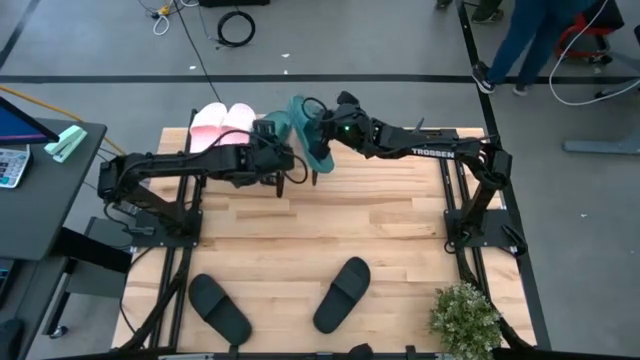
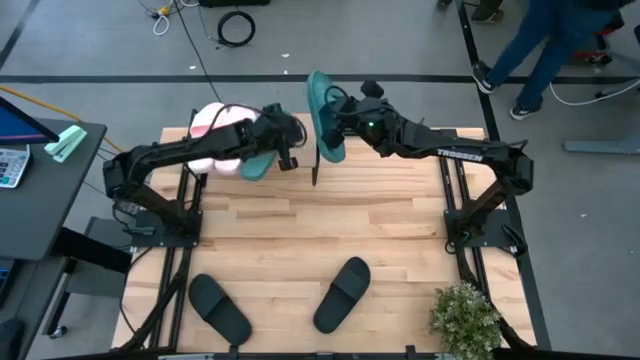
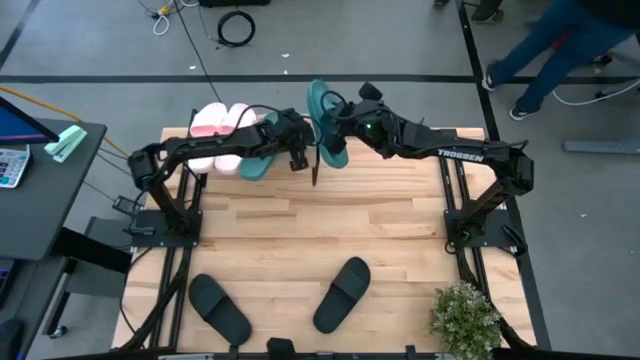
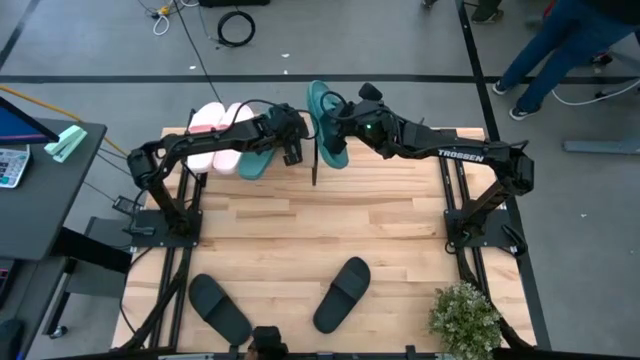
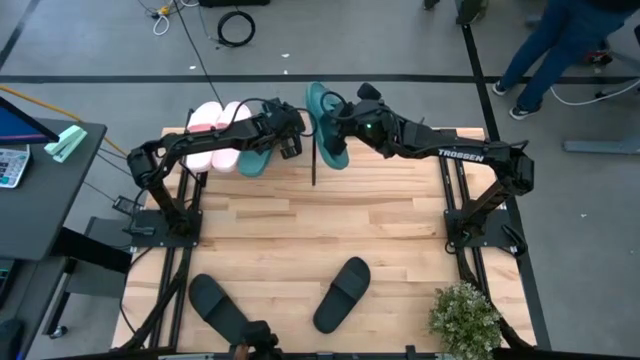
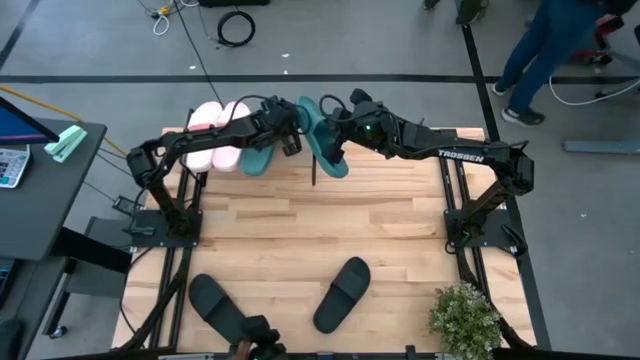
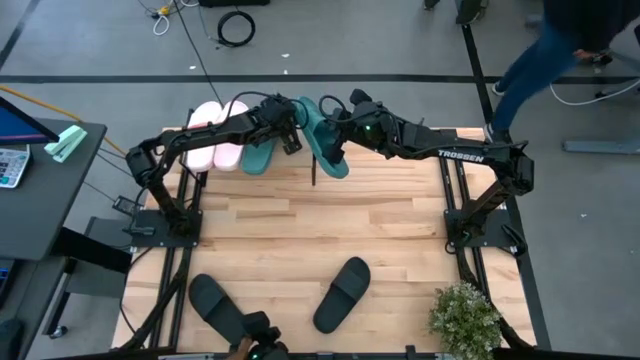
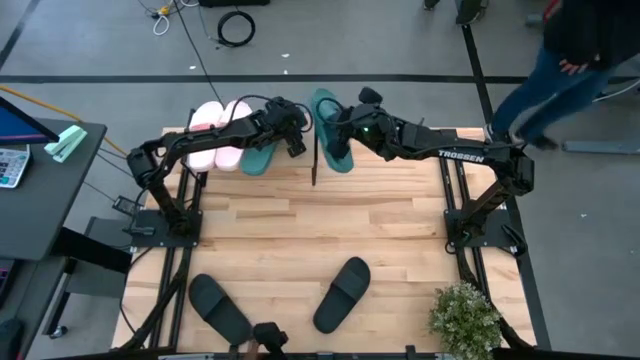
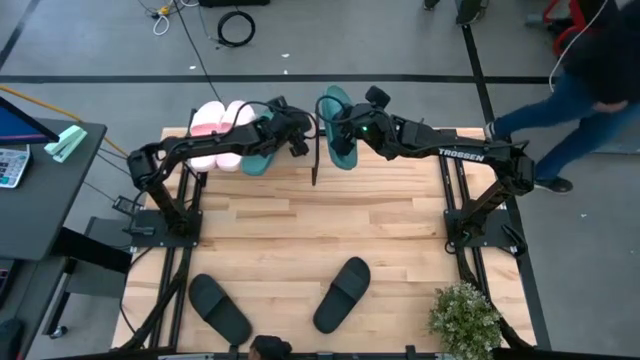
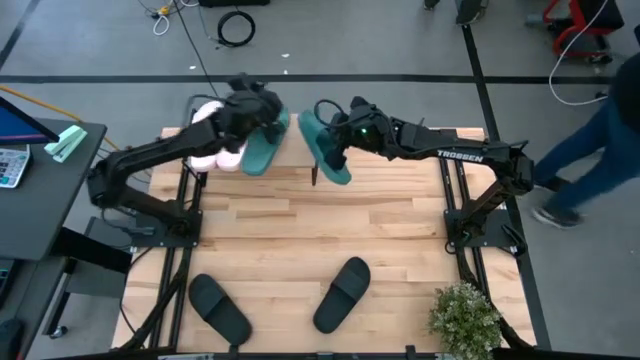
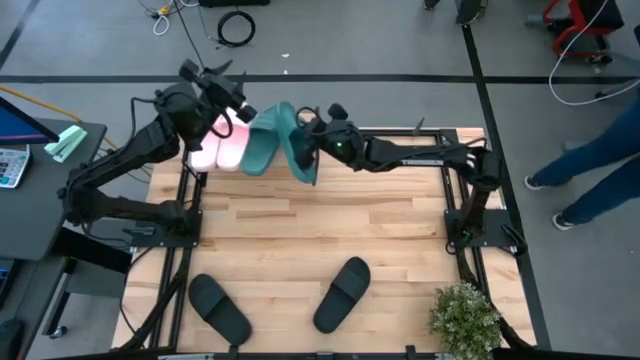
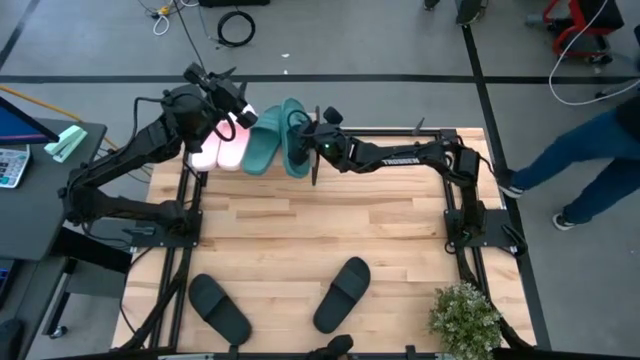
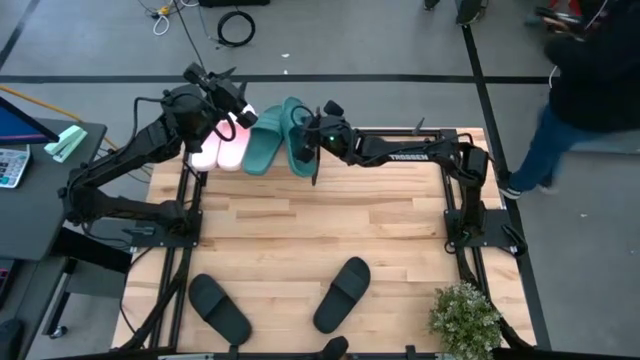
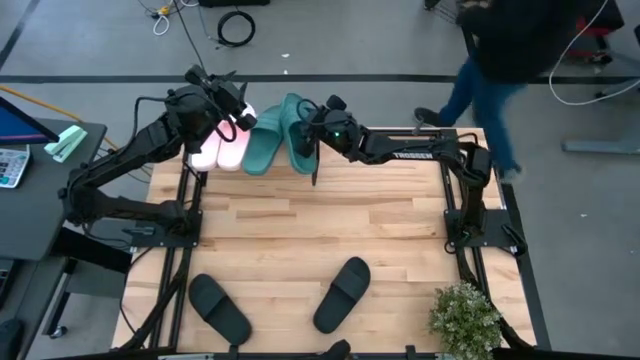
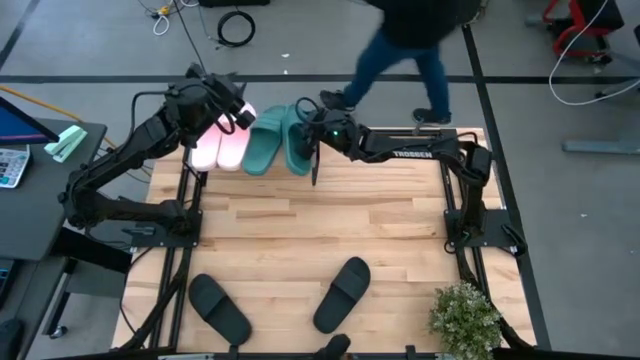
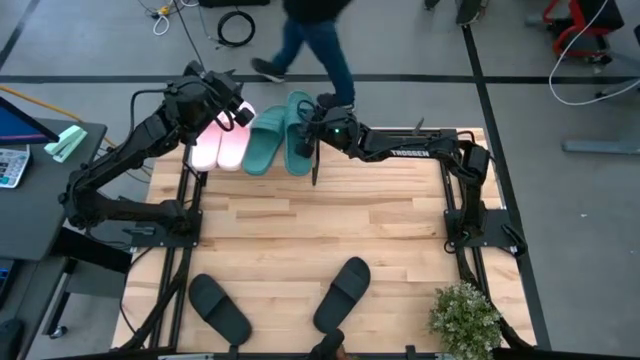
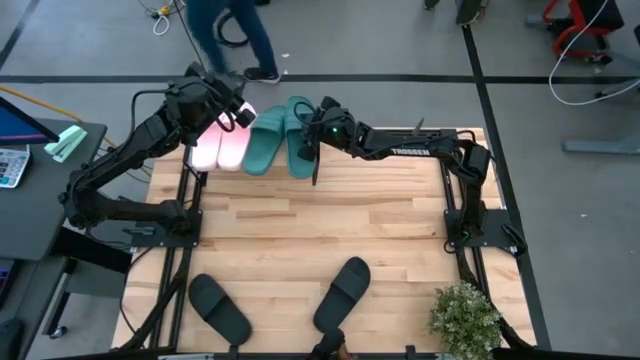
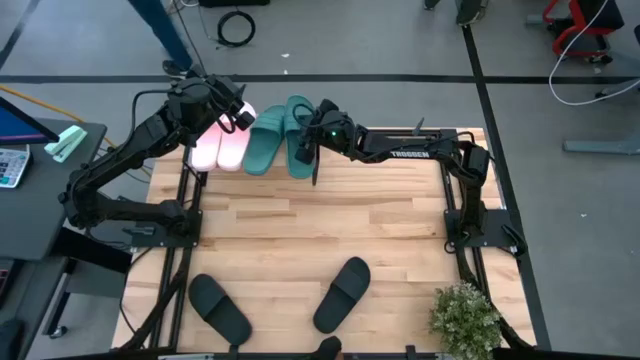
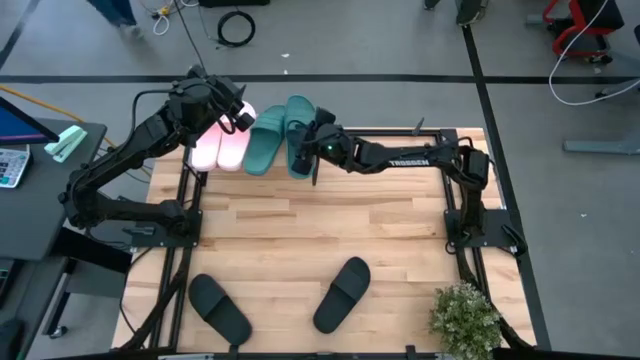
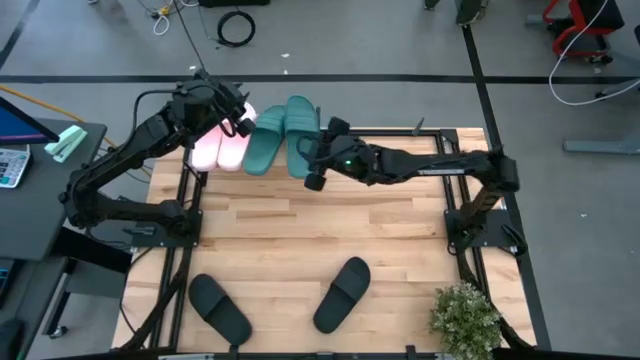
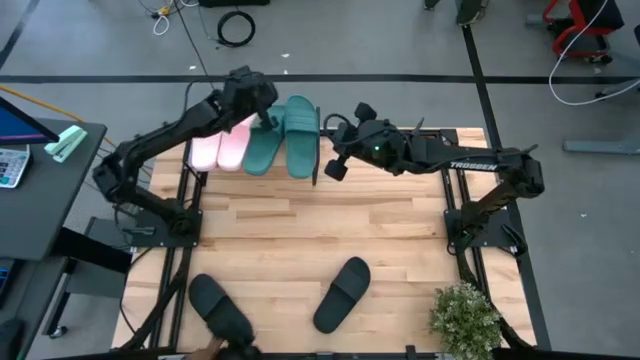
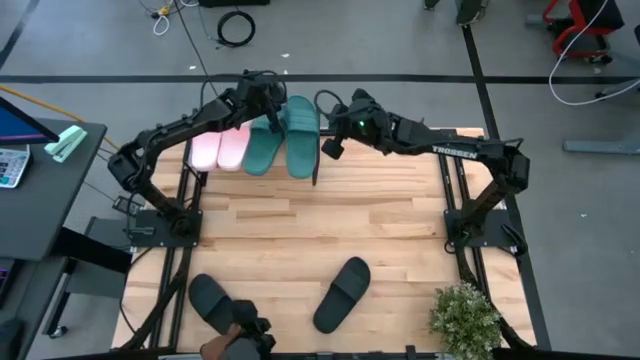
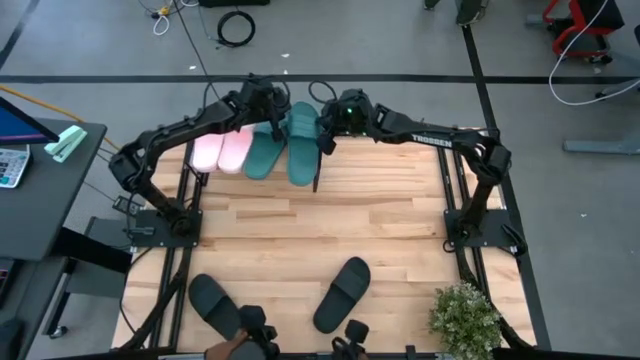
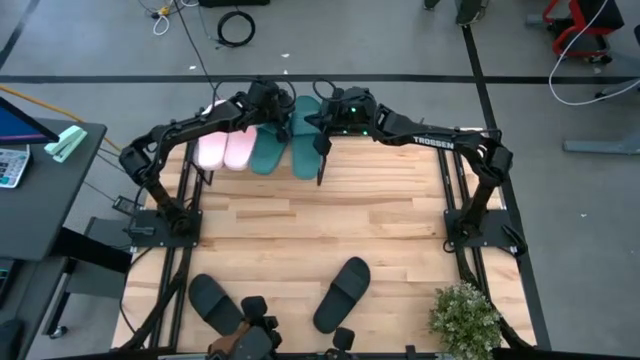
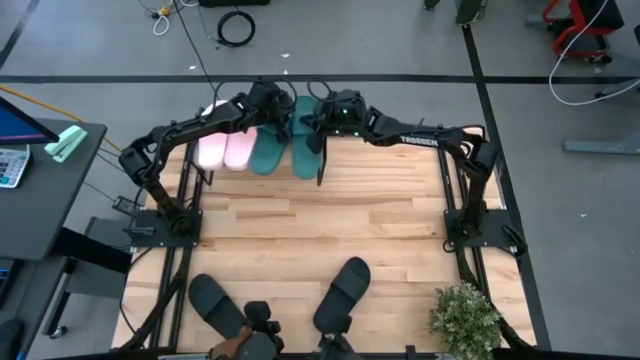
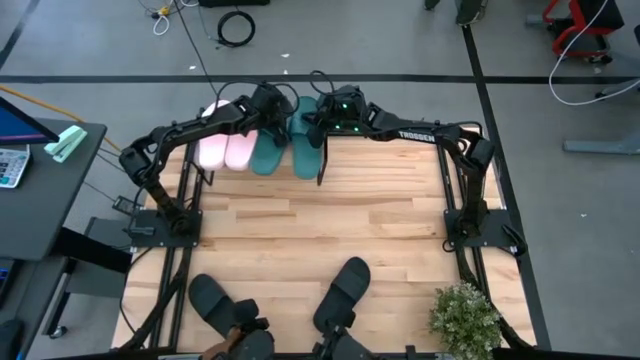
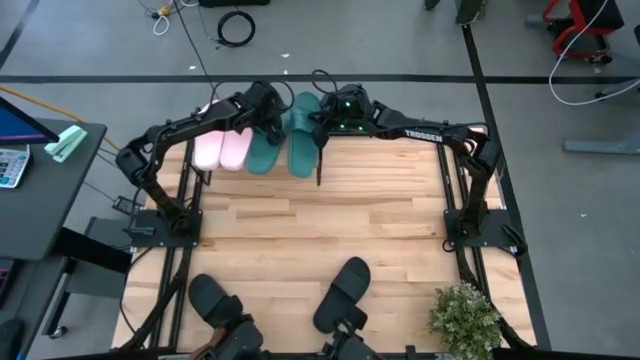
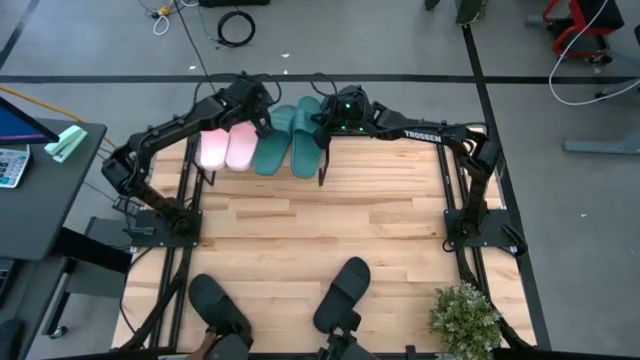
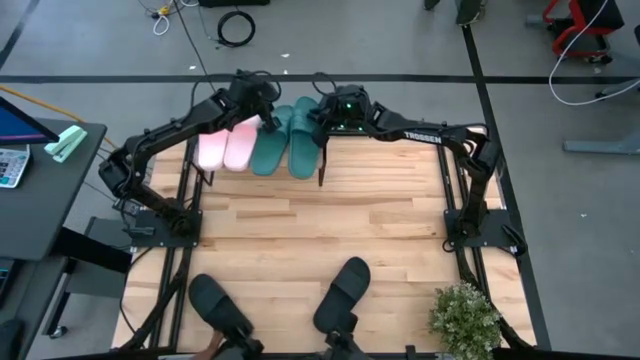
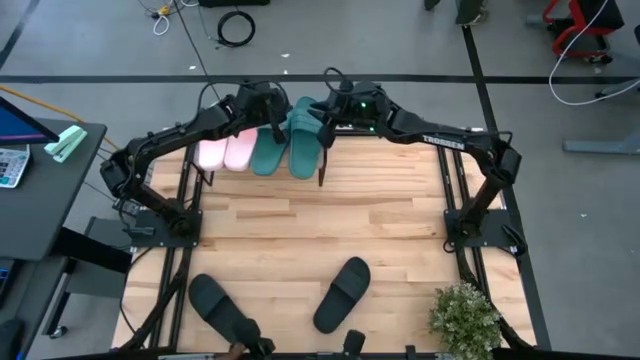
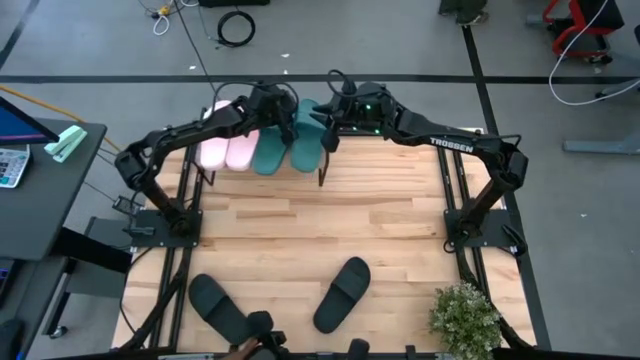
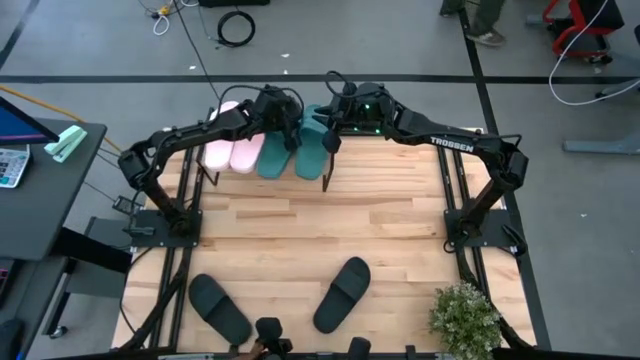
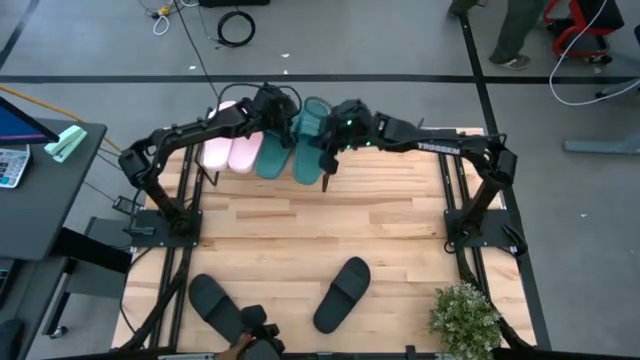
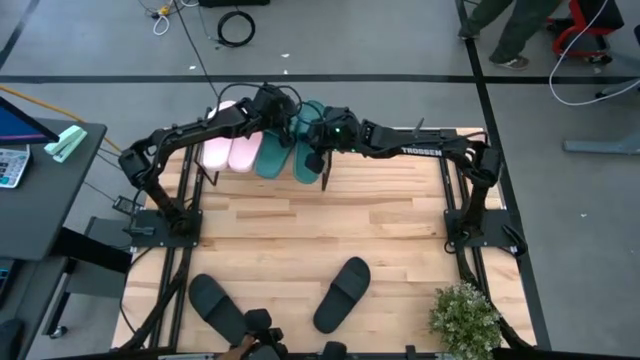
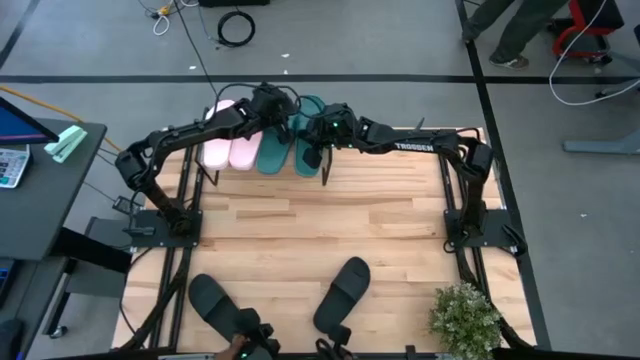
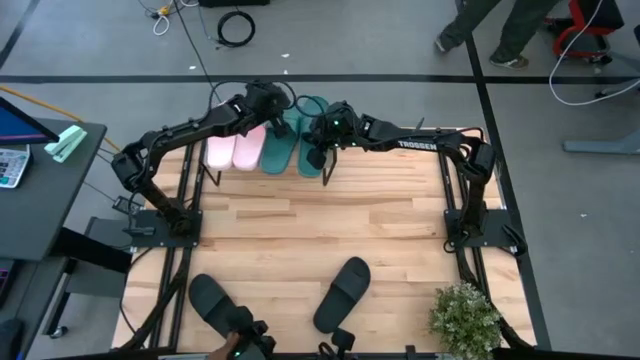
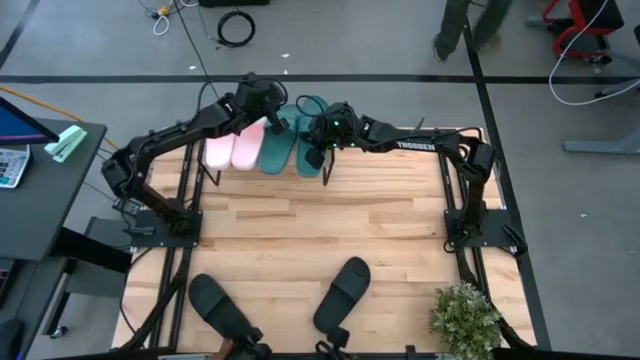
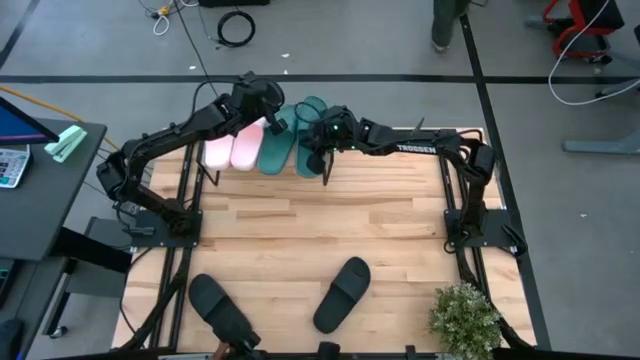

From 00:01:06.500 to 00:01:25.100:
Task: Pick and place slides into the shelf
Put the green slide on the shelf

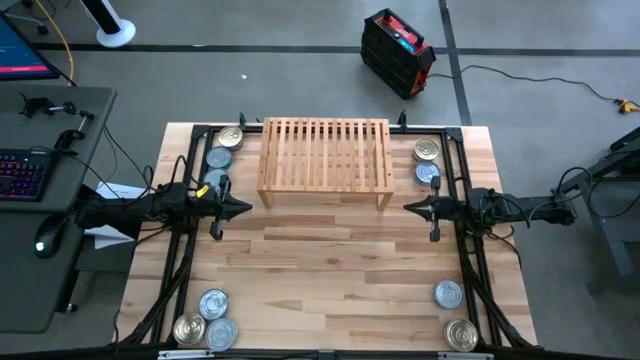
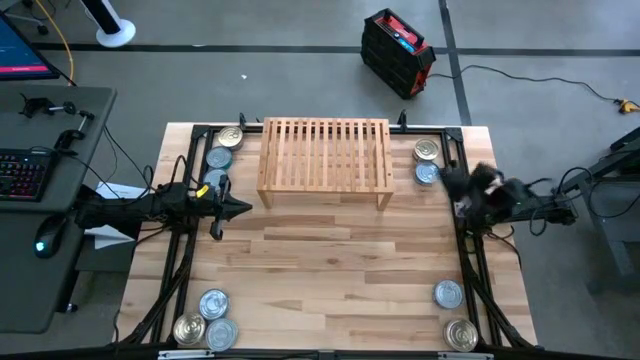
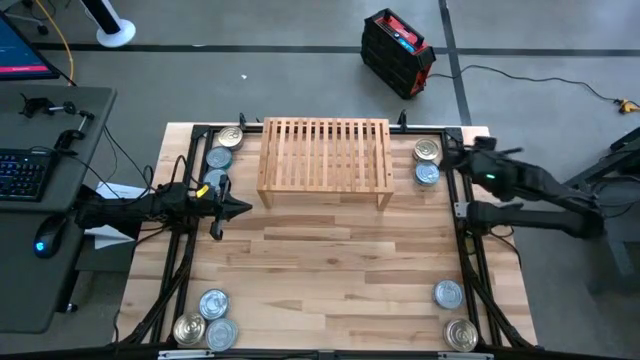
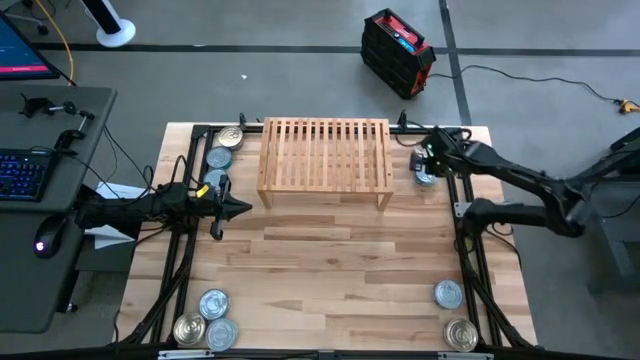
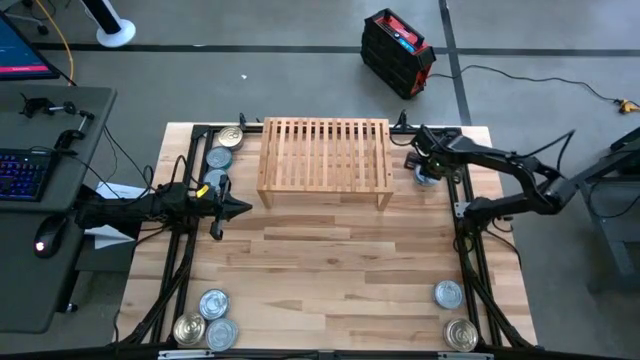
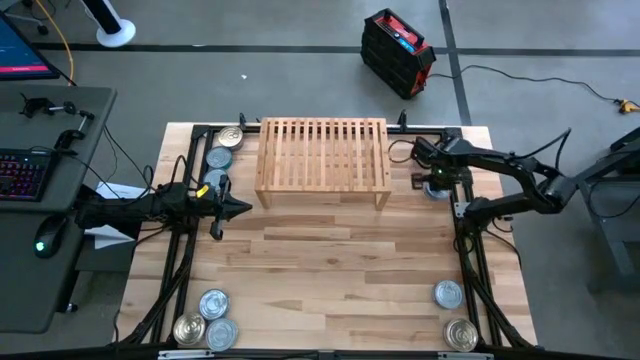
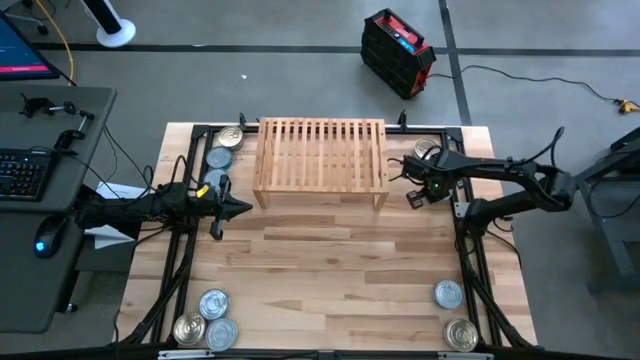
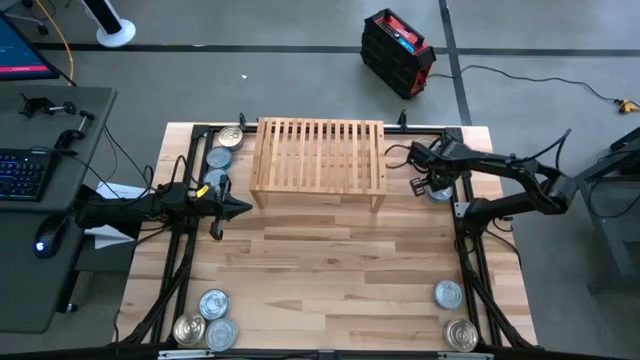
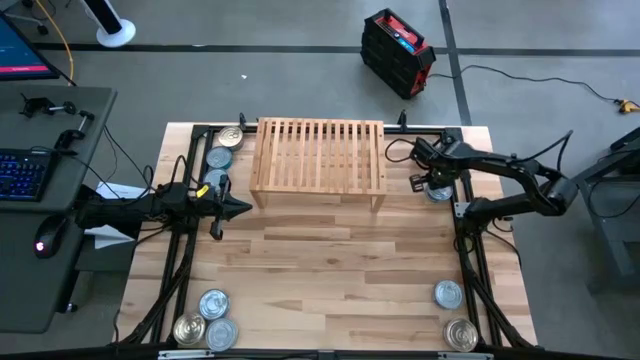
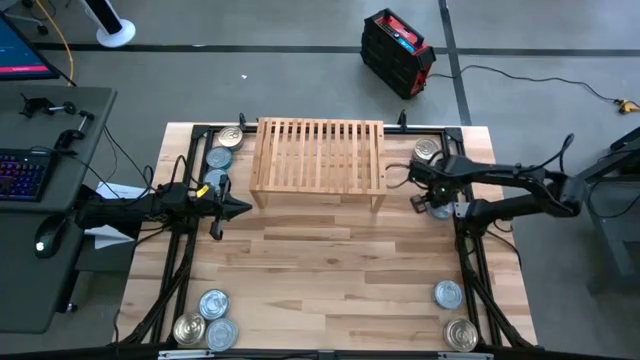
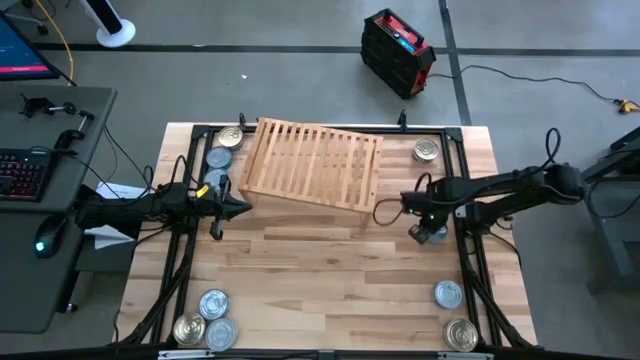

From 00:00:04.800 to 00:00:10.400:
Task: Stack canned seafood by type on shelf
Move the green tuna can to the center of the table
